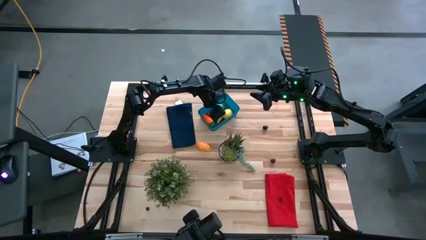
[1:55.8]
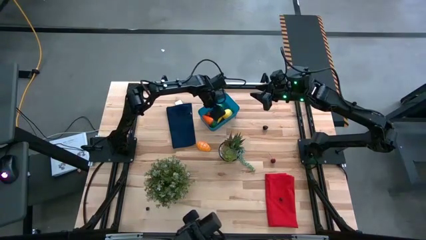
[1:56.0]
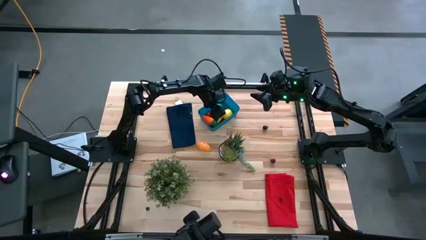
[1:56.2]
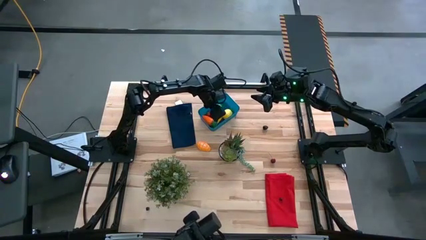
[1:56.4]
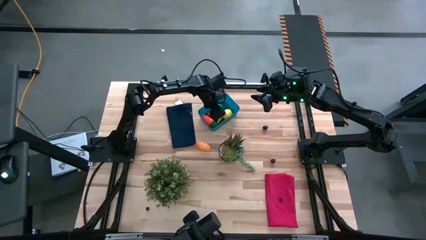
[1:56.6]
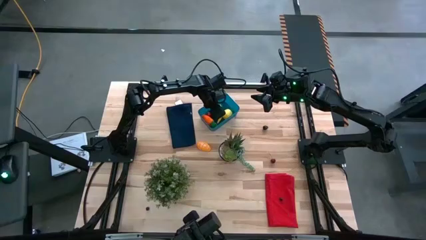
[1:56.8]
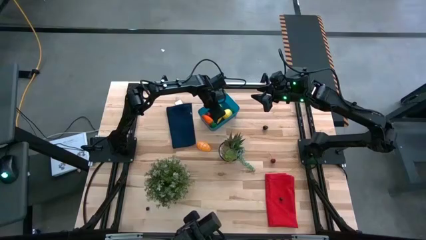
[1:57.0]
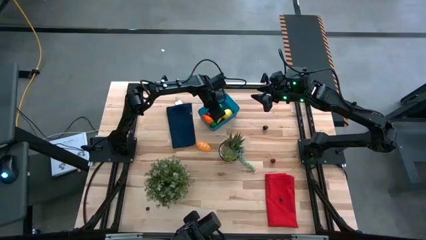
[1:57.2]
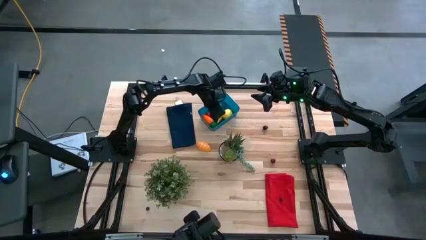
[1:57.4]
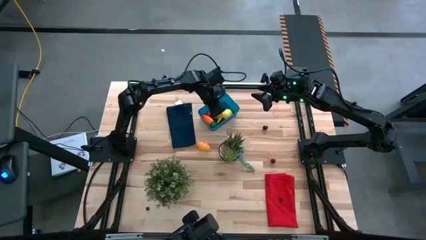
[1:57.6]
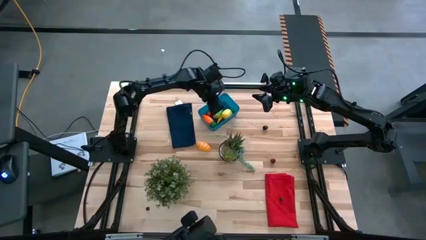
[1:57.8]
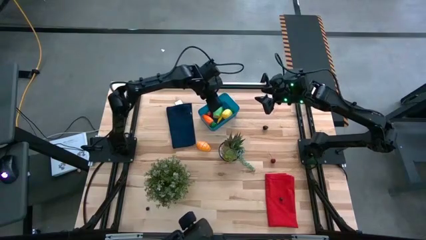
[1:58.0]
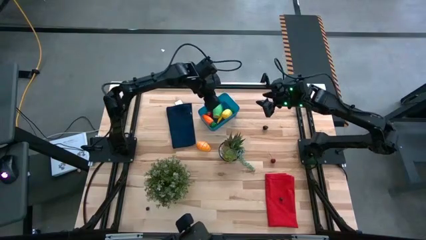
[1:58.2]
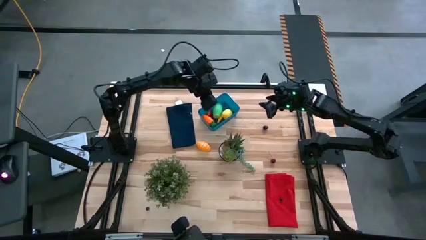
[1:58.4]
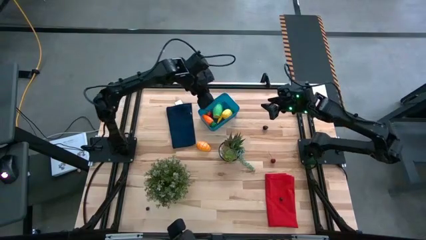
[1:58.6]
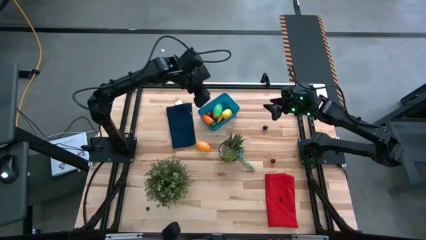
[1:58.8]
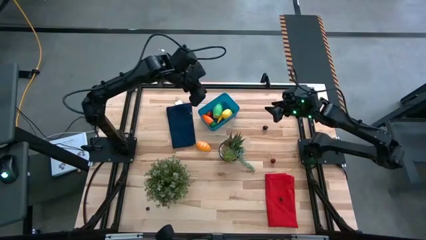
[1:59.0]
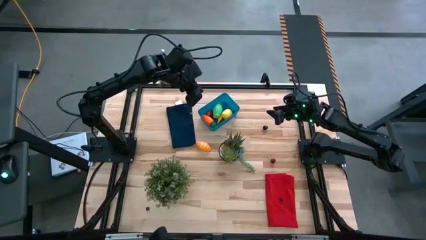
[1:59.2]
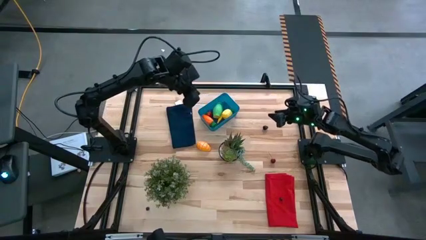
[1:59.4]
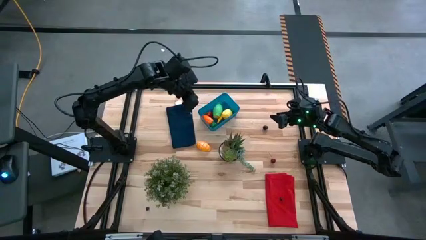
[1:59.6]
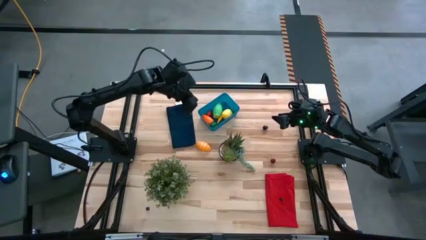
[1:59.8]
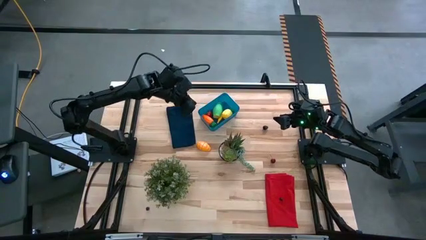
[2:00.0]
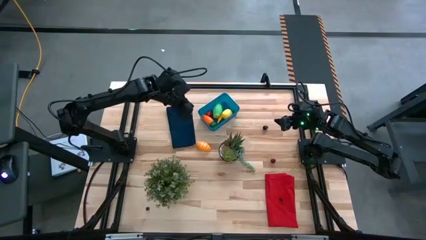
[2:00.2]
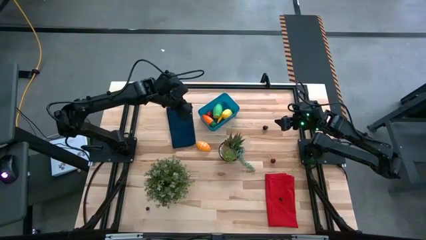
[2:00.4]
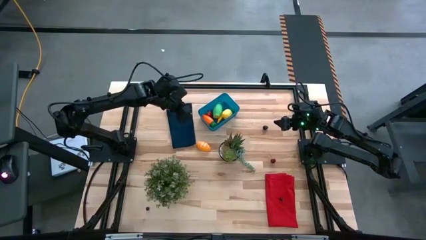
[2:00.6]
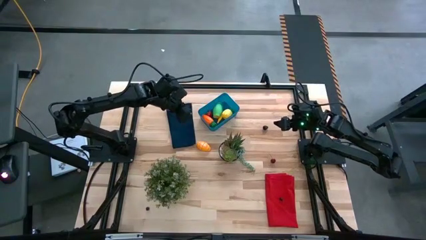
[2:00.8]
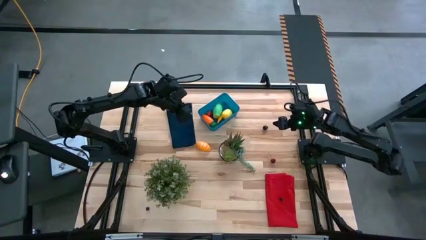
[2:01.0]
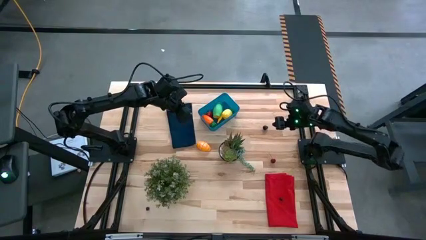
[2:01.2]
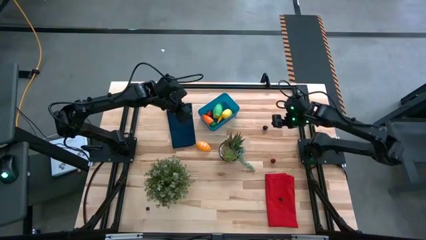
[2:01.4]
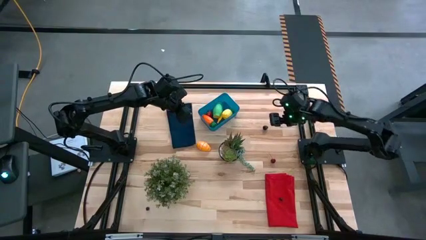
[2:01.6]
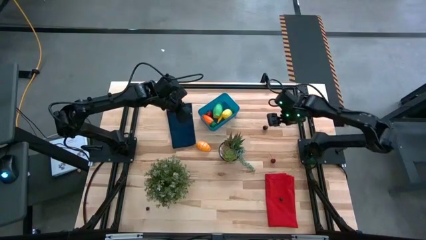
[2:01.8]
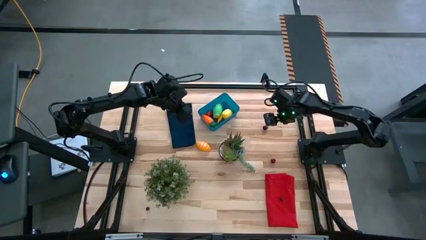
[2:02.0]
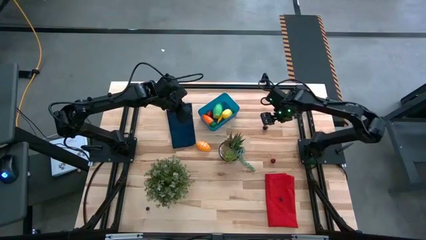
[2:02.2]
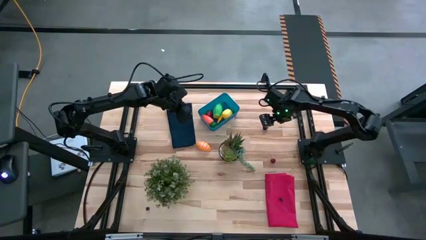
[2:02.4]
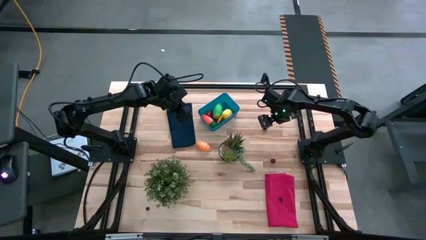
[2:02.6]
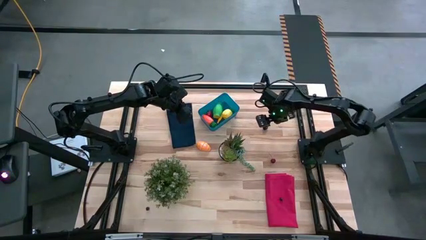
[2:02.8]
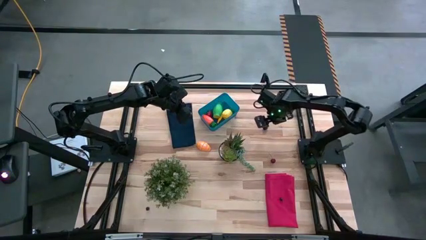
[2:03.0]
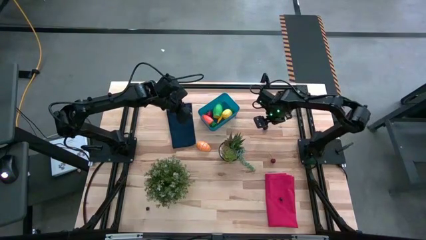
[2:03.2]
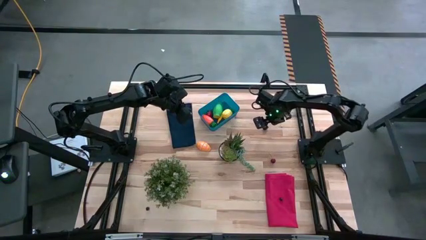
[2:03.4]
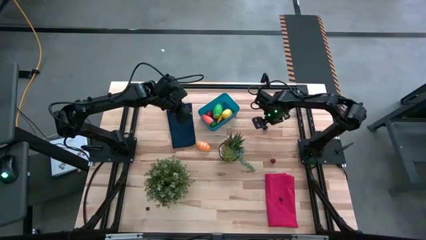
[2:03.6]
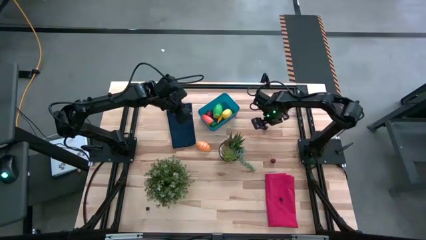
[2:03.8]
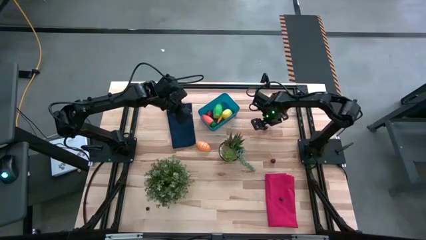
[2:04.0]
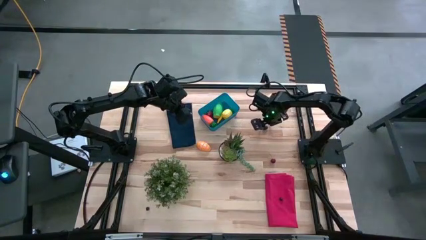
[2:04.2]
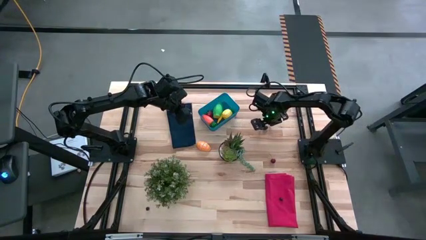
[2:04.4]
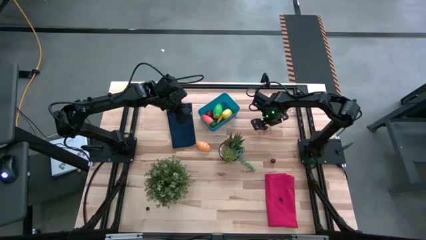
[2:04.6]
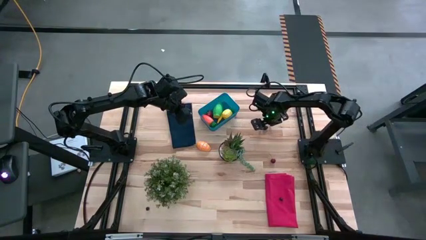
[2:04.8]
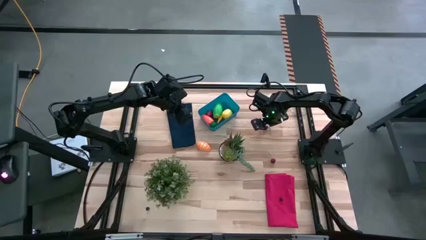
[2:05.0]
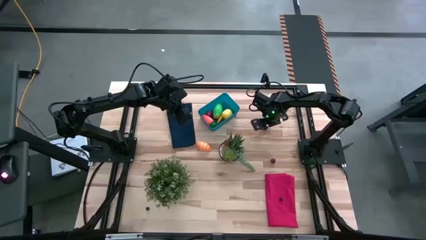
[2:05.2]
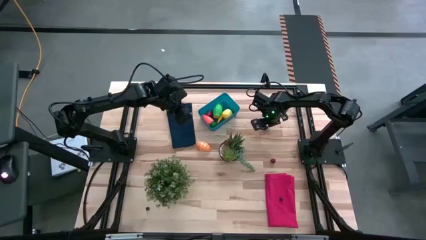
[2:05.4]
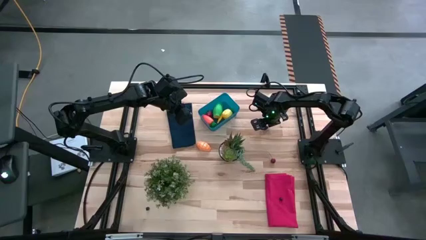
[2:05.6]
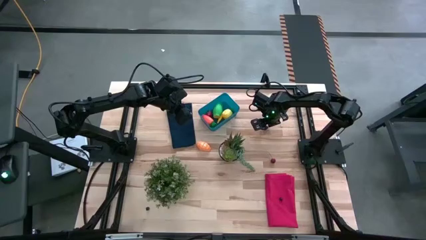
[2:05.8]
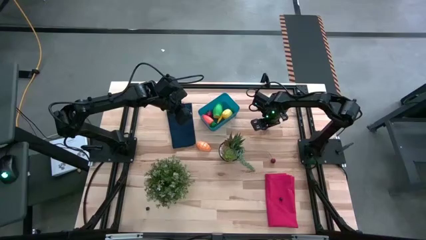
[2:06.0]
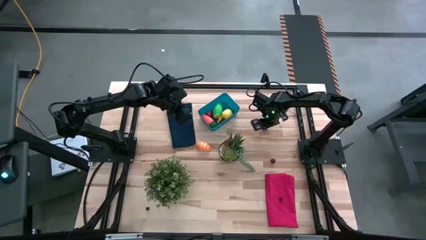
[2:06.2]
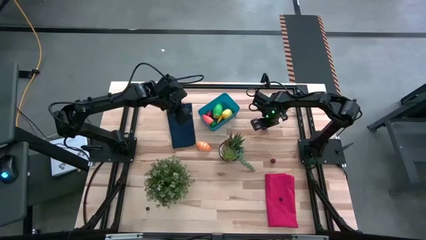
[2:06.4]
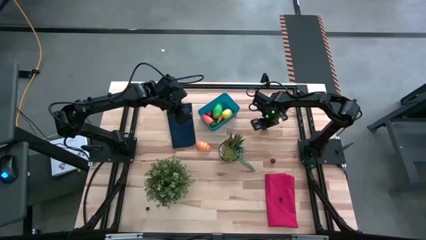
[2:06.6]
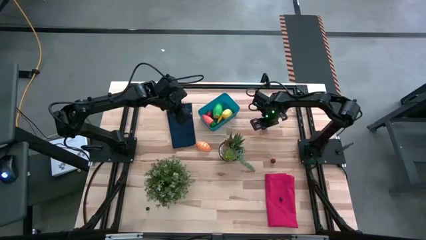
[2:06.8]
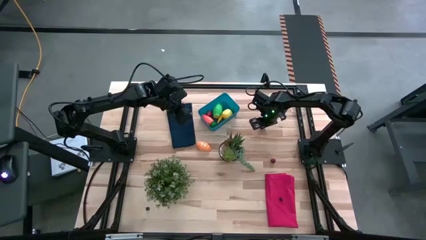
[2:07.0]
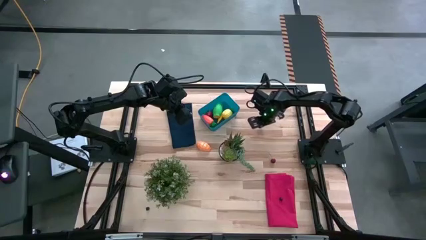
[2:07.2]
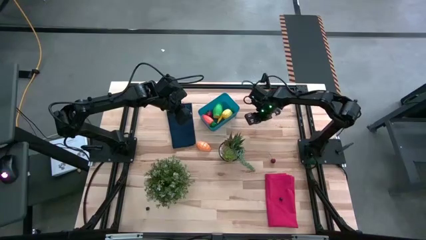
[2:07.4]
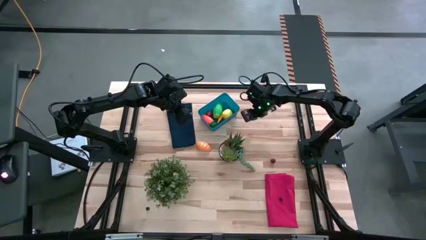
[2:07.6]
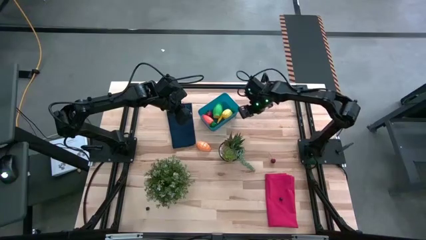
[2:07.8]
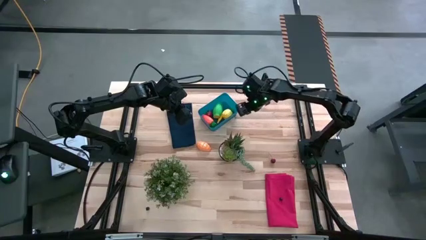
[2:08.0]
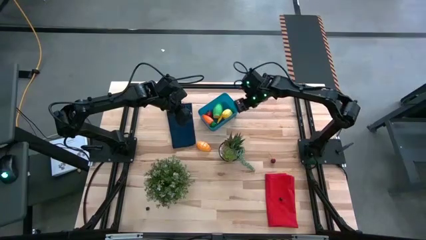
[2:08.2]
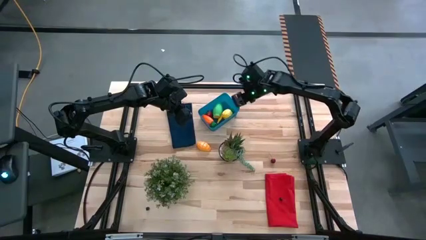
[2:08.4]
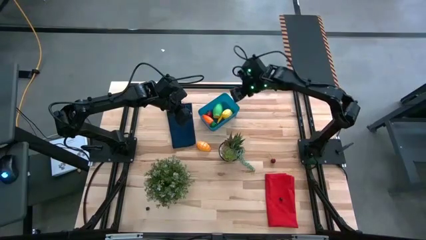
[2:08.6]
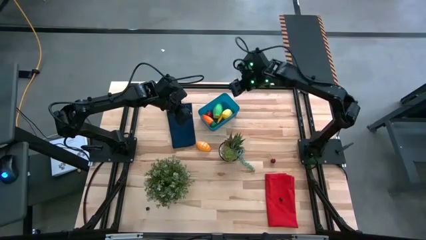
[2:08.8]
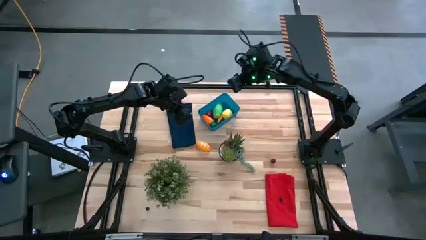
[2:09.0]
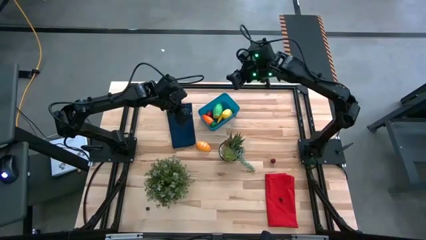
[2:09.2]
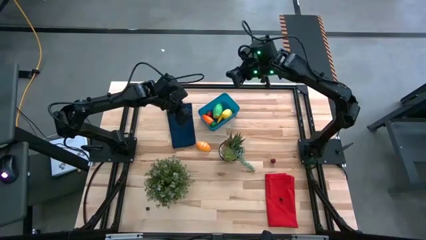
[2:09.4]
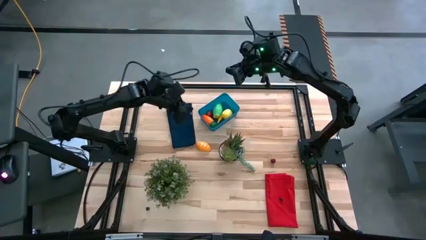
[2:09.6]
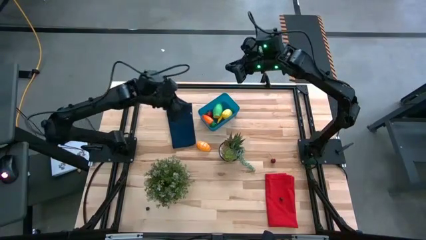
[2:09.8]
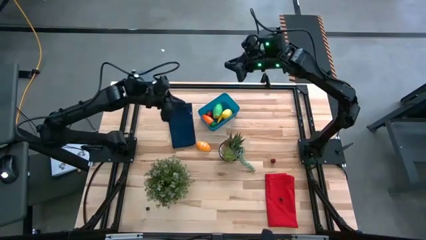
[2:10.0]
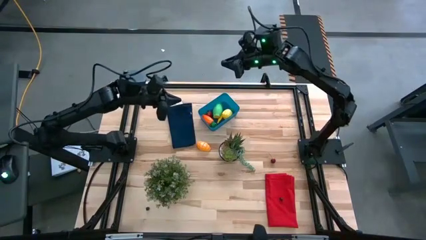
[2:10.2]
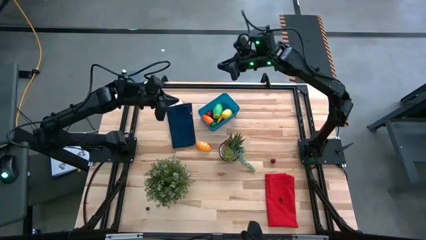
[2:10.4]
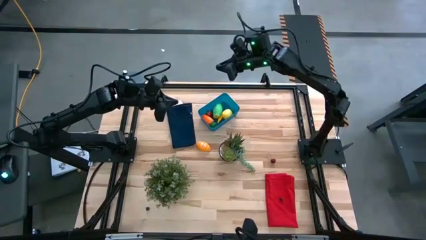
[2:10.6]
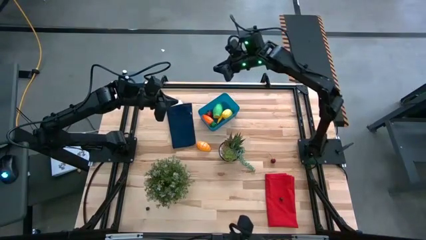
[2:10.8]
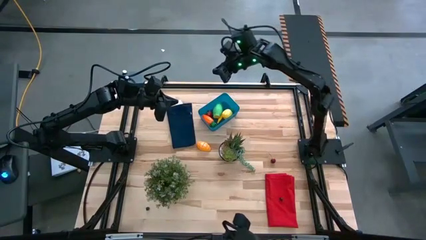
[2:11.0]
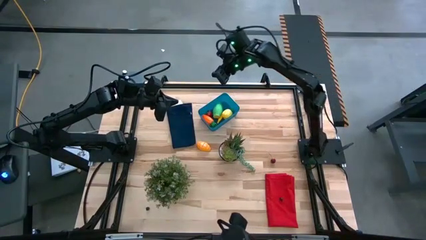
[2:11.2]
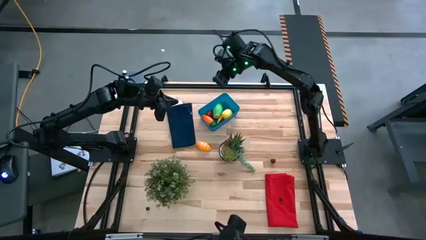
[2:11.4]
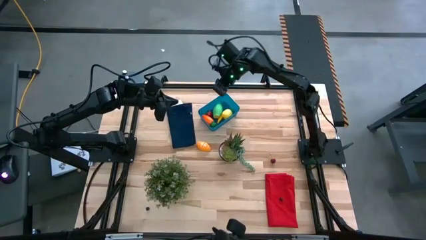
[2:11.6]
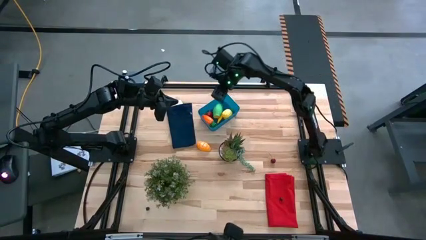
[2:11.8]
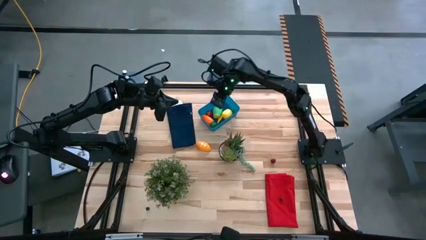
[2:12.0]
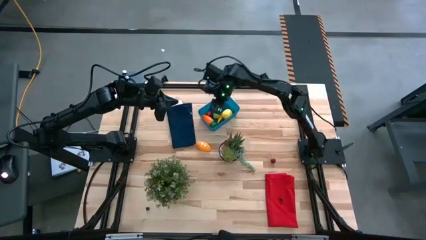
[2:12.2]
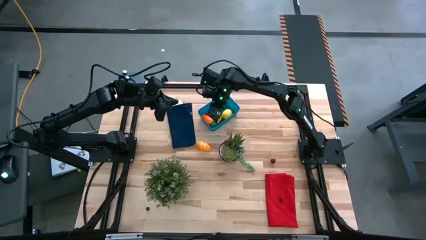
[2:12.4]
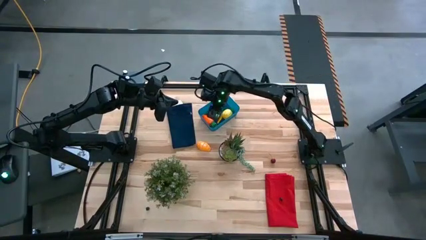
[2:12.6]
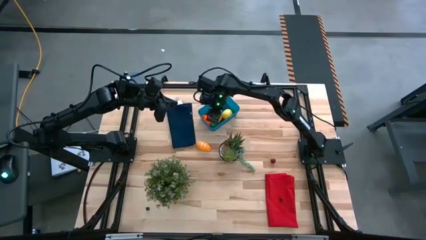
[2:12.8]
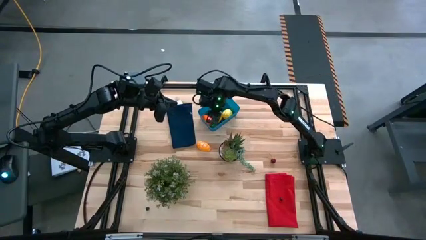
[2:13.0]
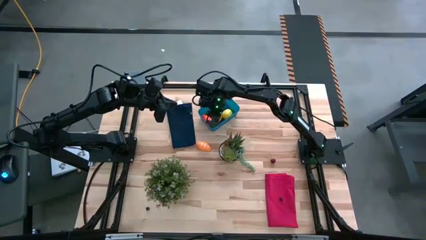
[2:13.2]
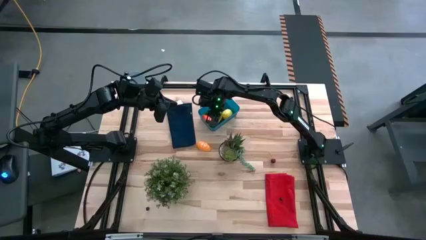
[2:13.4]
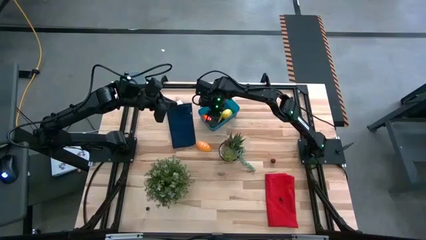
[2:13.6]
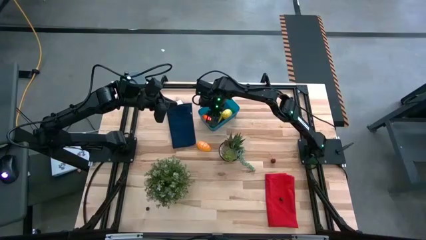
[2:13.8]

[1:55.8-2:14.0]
Task: Pick and placing Produce into tupperware
Put the black raspberry into the blue bin
